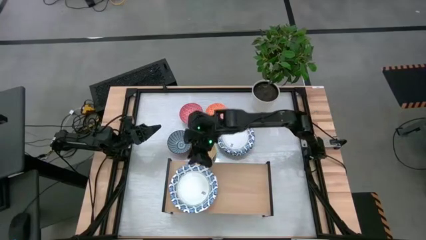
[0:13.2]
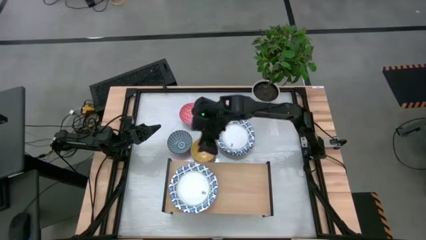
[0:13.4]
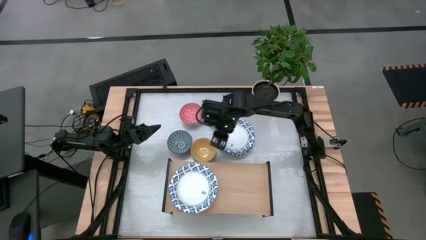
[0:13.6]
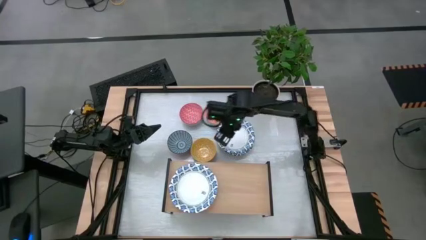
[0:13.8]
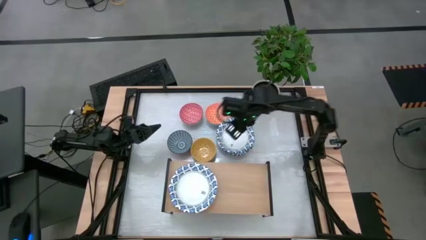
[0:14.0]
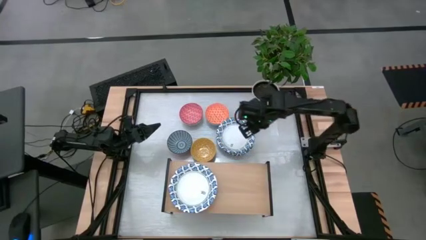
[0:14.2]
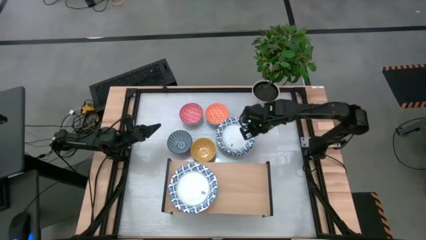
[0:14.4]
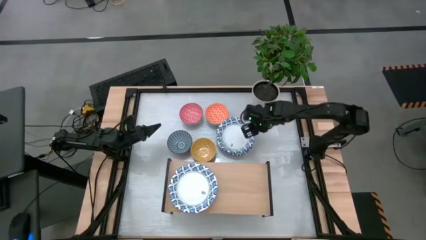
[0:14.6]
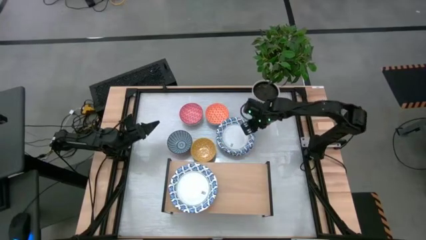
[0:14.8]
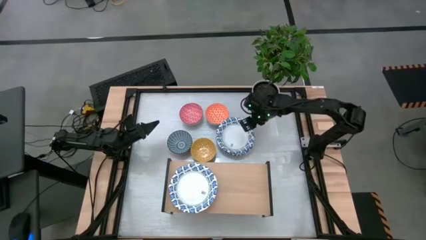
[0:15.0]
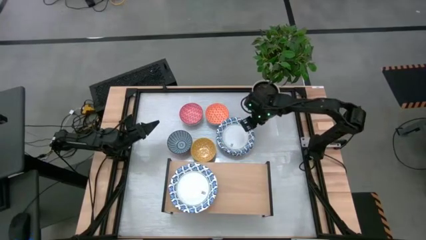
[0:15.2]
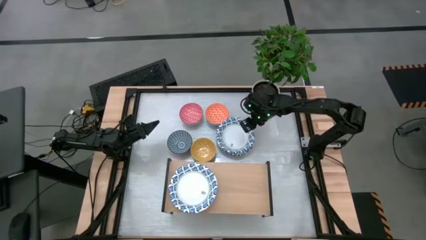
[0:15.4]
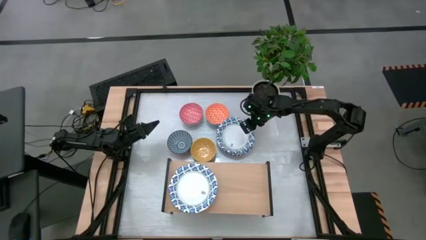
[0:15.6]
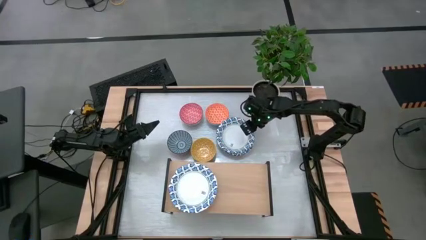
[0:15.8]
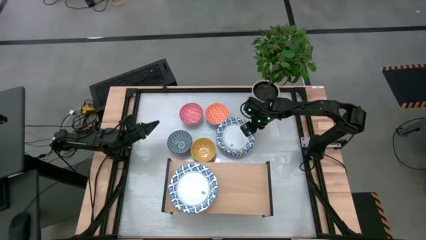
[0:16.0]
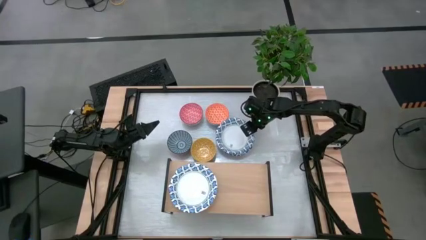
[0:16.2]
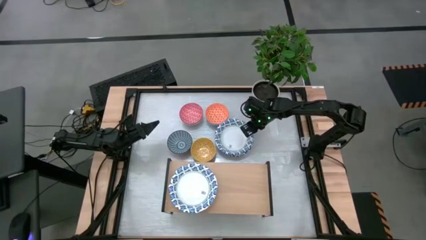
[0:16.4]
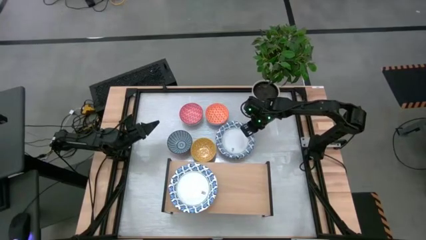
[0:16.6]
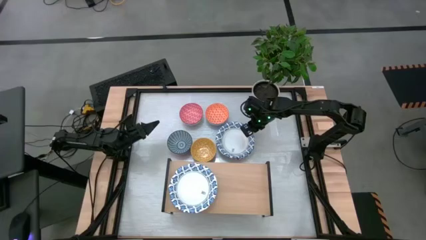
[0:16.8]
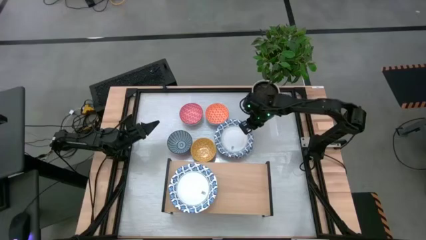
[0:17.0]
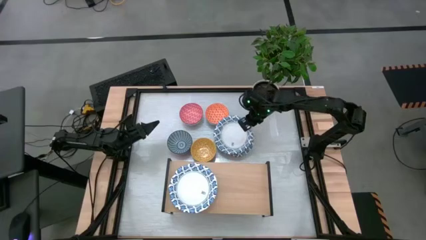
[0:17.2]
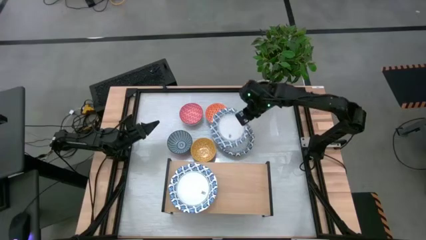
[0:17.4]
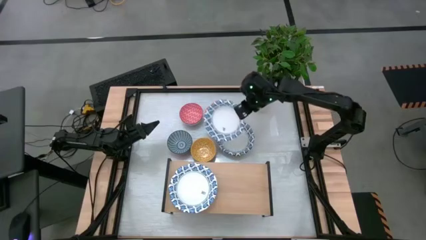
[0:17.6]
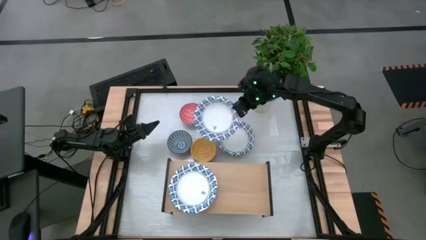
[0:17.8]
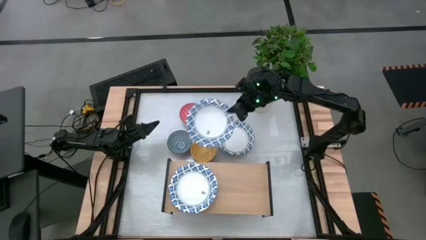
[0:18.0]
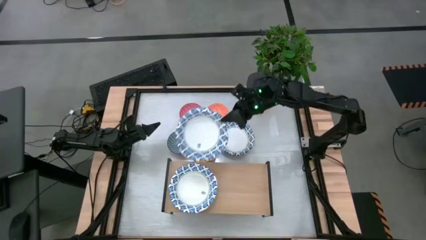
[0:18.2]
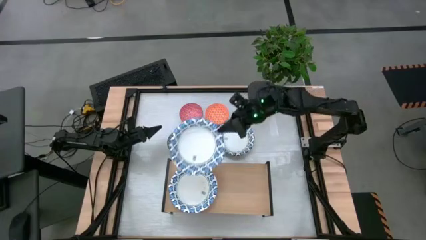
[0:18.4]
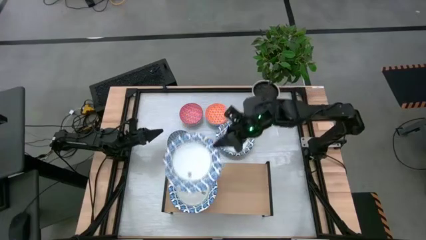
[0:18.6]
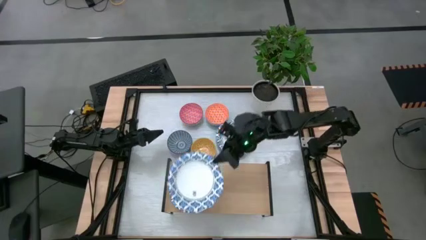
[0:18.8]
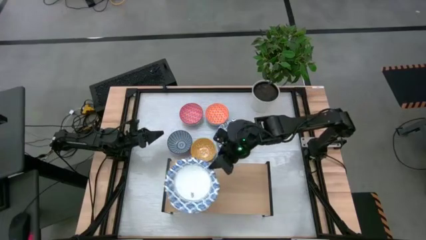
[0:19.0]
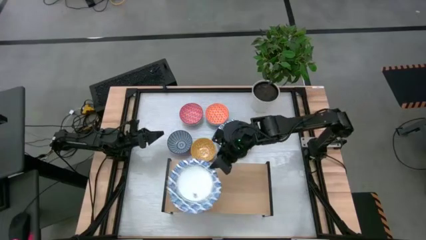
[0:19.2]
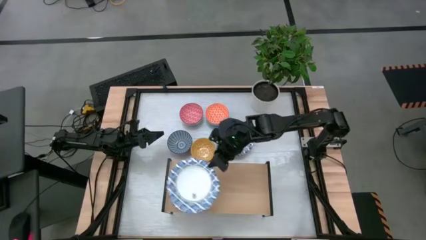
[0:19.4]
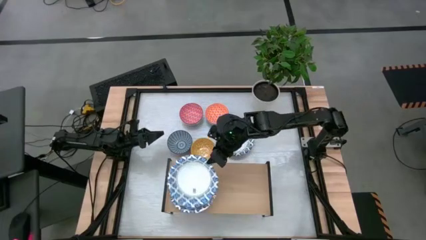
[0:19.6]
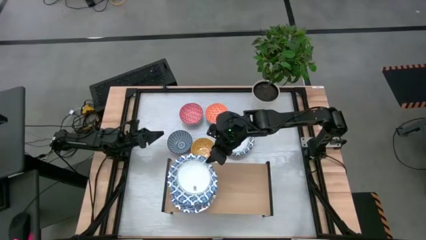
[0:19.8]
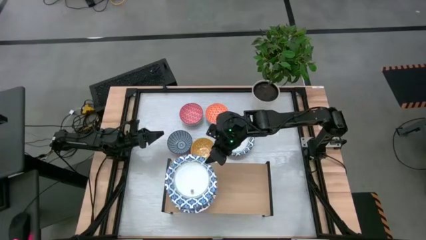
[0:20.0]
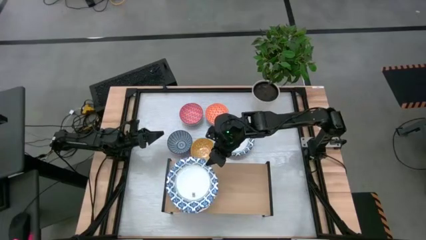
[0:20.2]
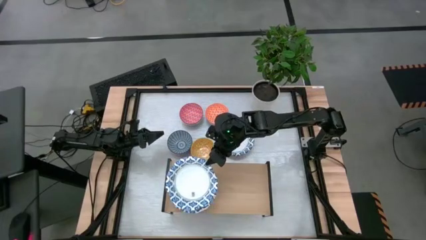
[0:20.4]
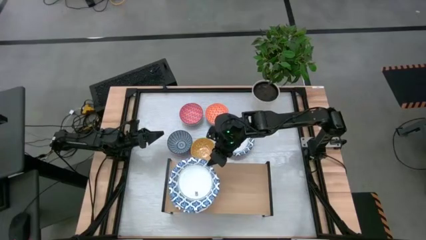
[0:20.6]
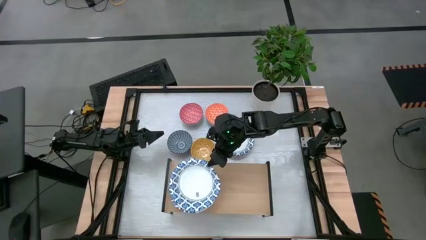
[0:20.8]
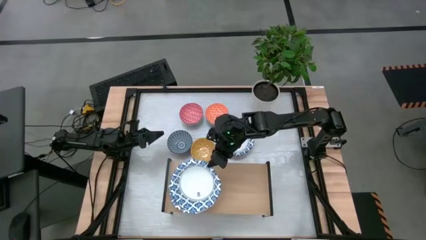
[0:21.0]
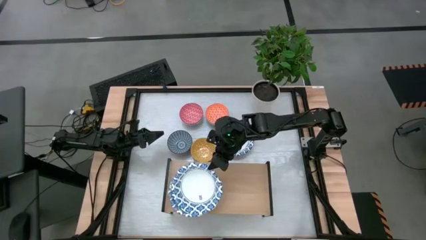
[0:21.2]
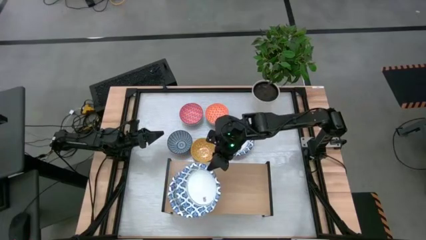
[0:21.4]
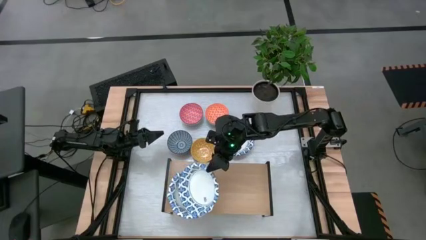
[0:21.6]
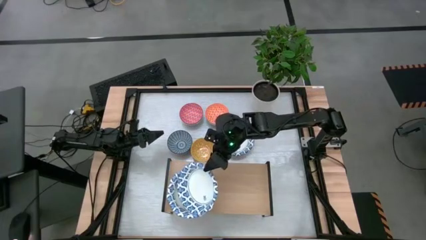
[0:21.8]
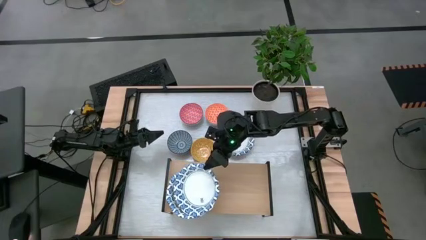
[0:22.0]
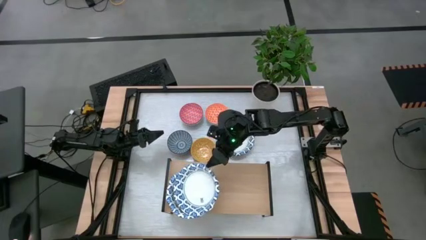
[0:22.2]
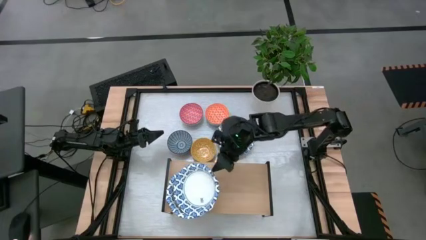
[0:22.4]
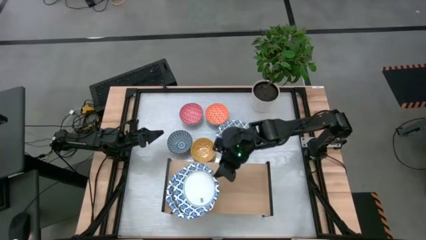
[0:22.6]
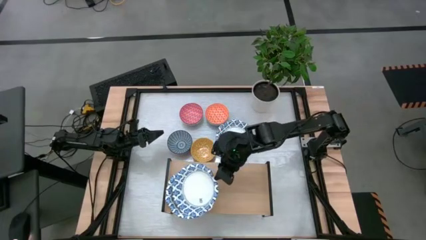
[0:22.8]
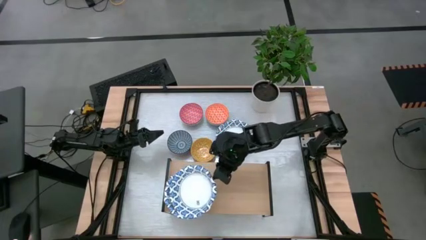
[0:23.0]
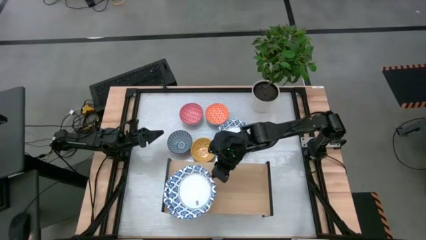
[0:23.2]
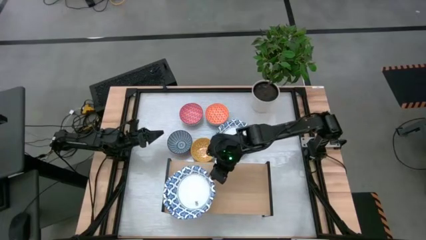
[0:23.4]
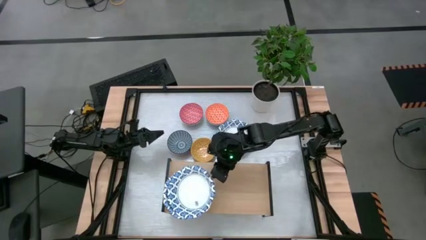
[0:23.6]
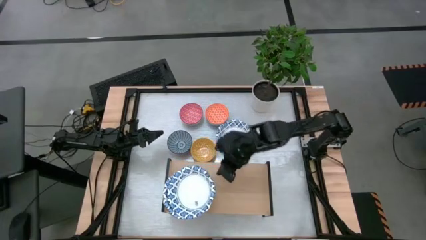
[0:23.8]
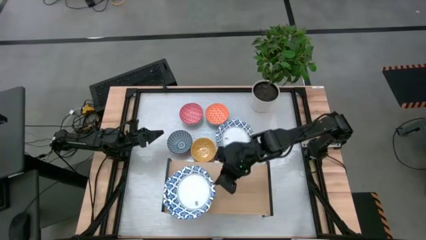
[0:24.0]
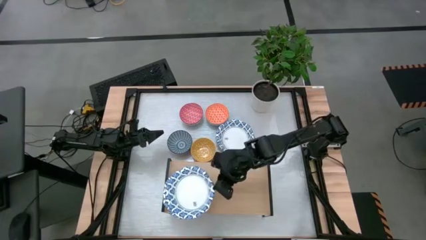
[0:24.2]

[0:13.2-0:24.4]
Task: Place and stack bowls onto a shelf
Stack the white patterned bowl on top of the other white patterned bowl on the shelf

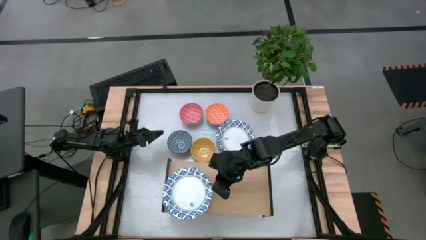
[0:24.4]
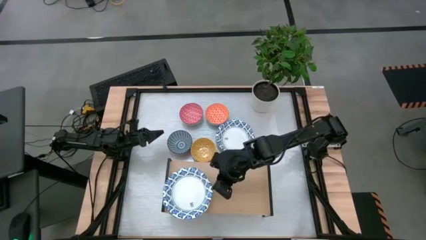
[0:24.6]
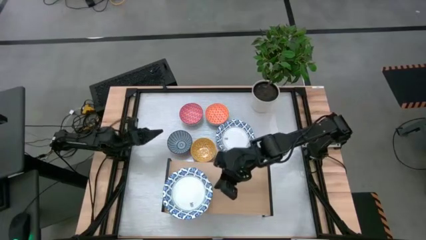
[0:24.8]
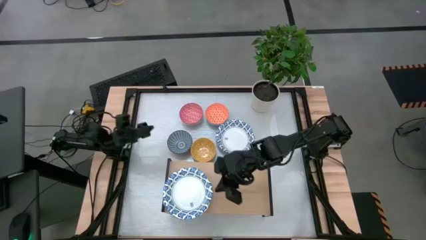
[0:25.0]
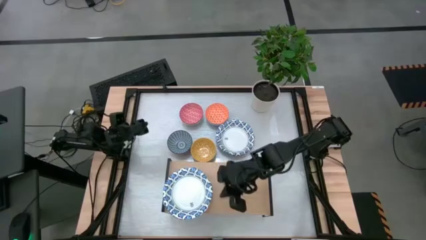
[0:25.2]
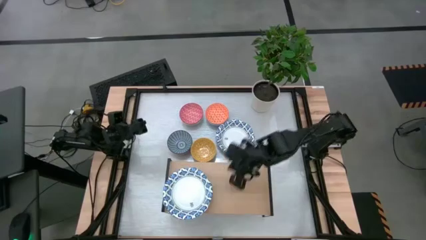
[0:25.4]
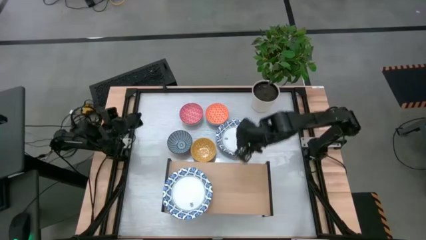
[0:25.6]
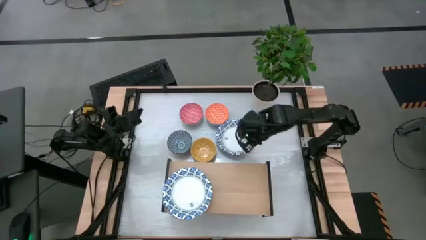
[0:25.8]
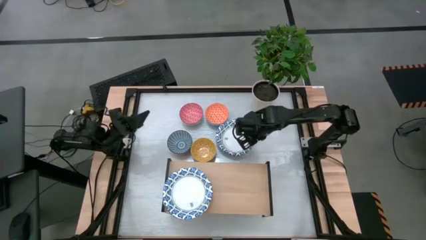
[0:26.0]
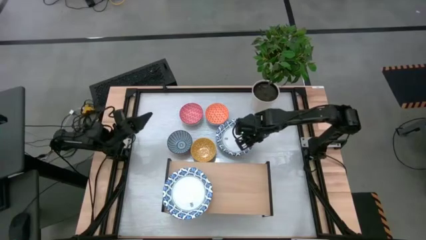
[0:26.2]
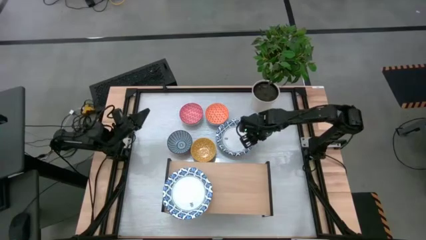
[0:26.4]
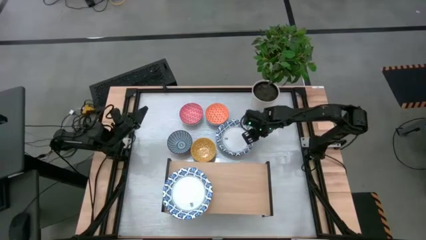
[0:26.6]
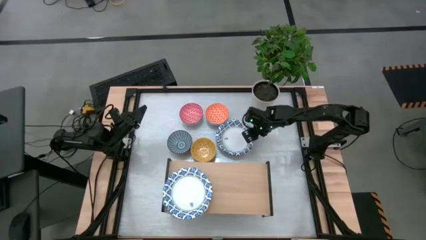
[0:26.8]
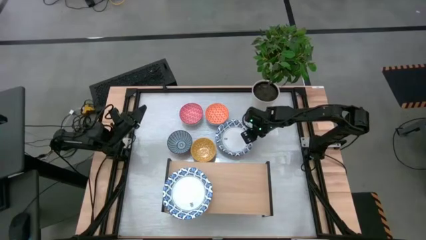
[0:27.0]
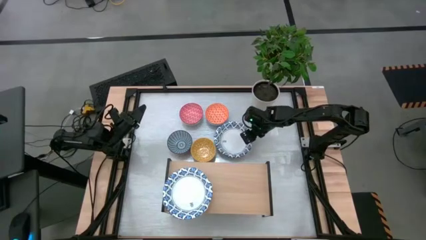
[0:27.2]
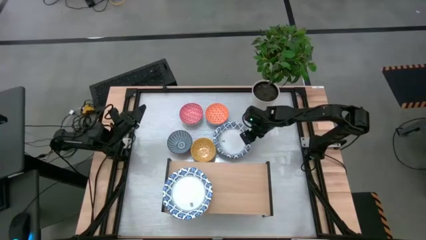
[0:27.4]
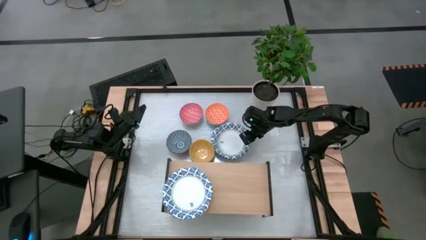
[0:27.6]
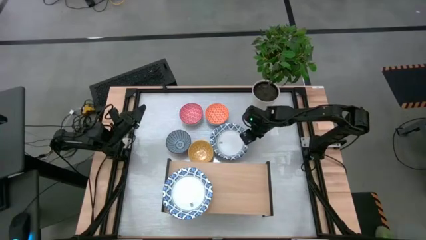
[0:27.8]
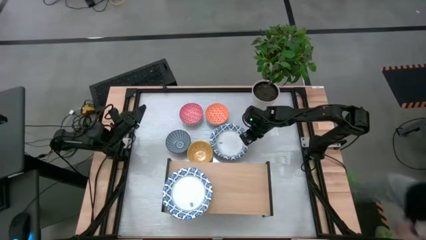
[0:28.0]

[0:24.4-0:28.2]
Stack the white patterned bowl on top of the other white patterned bowls on the shelf
